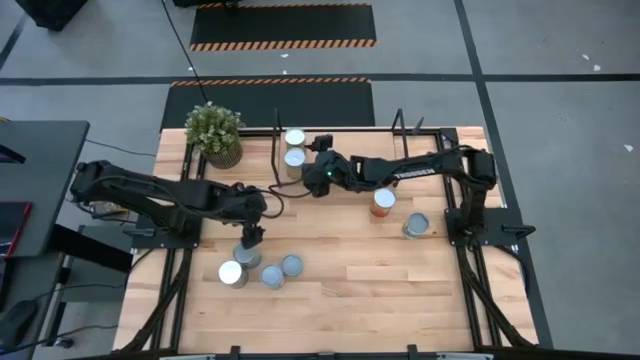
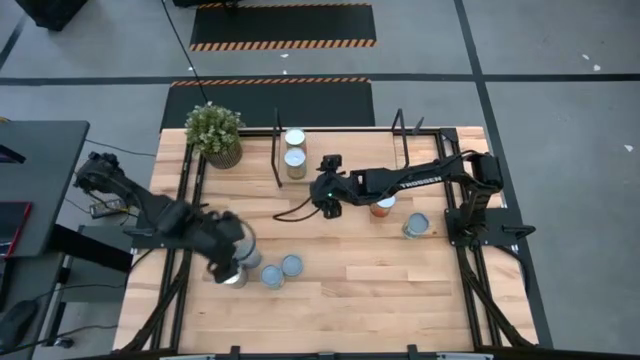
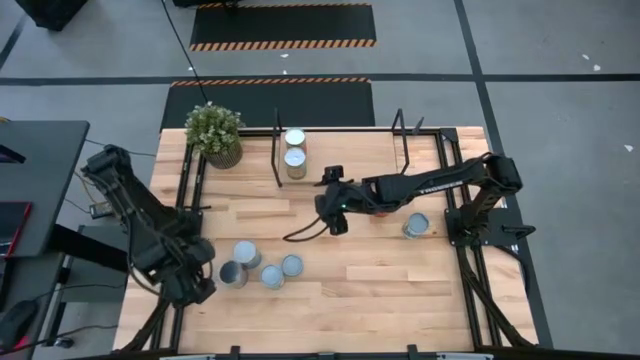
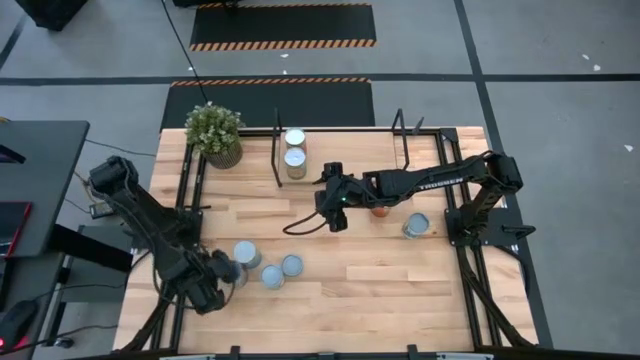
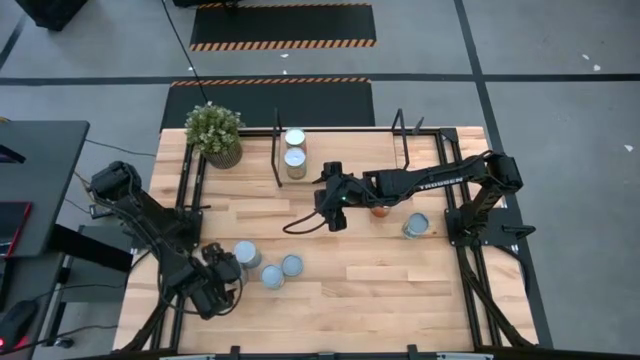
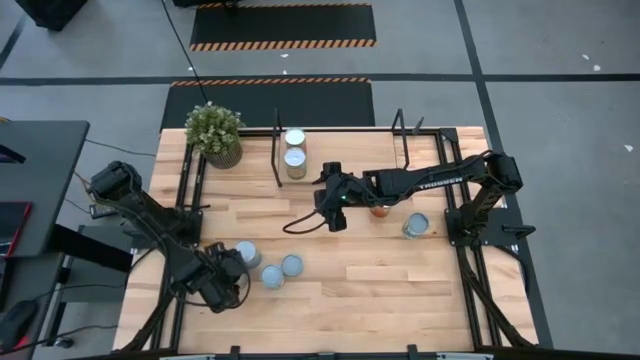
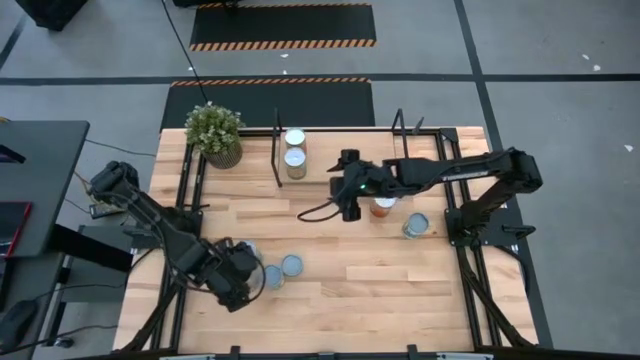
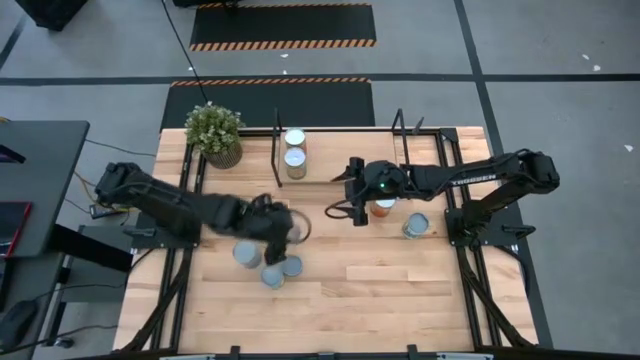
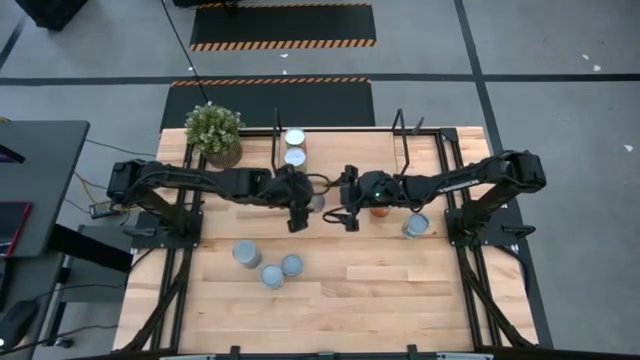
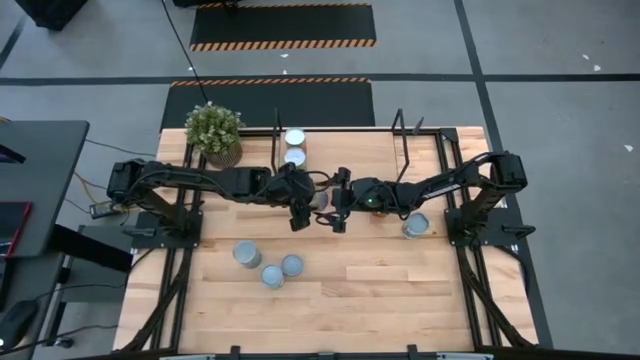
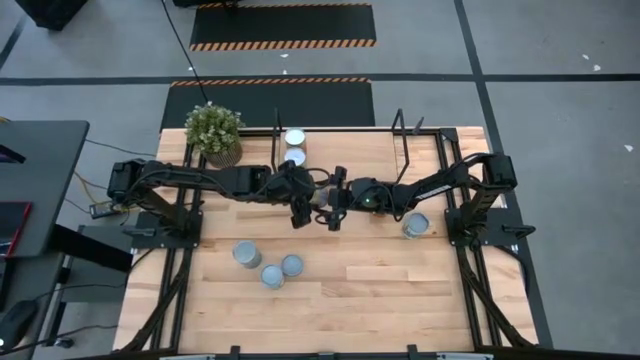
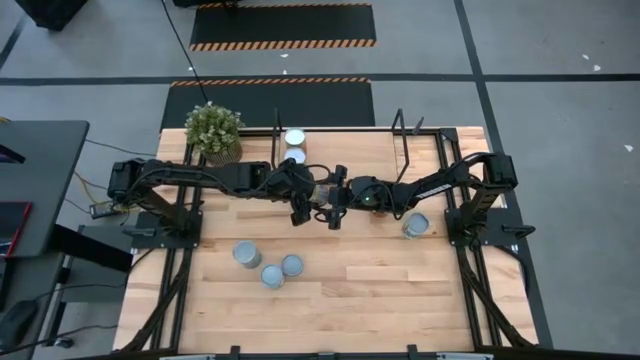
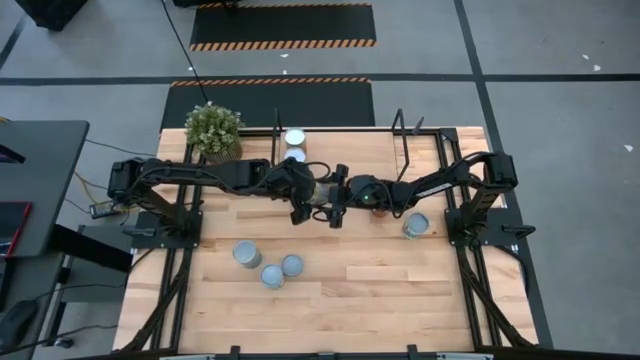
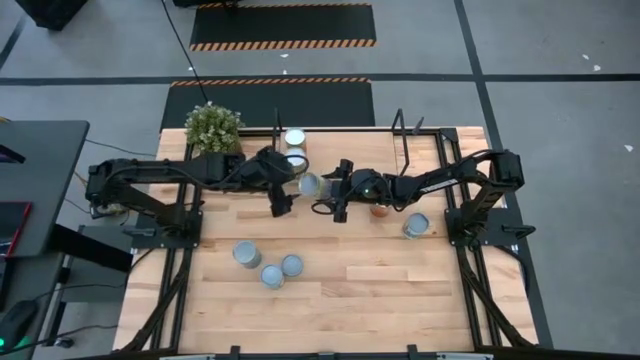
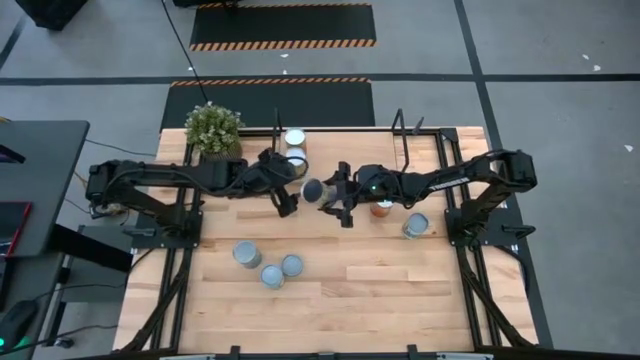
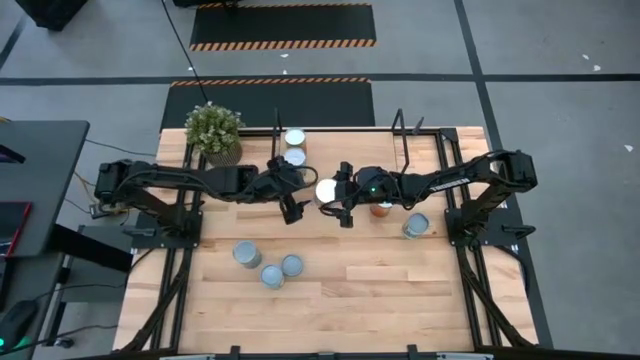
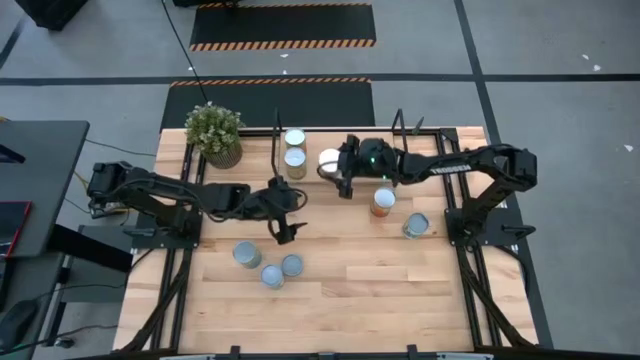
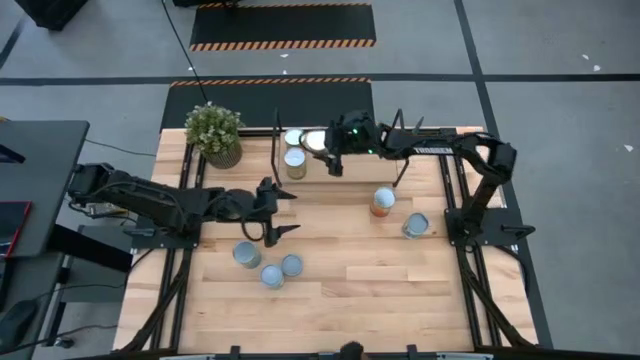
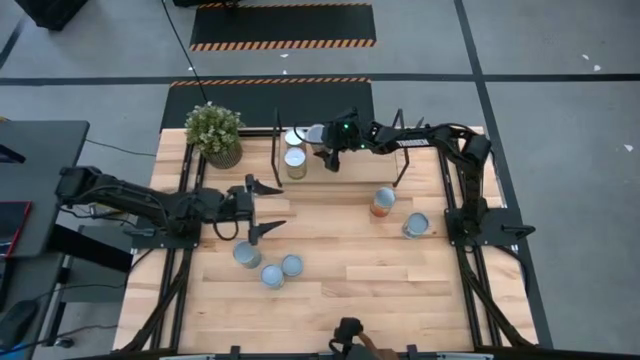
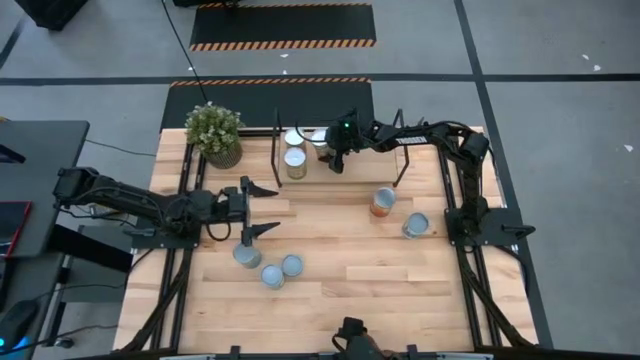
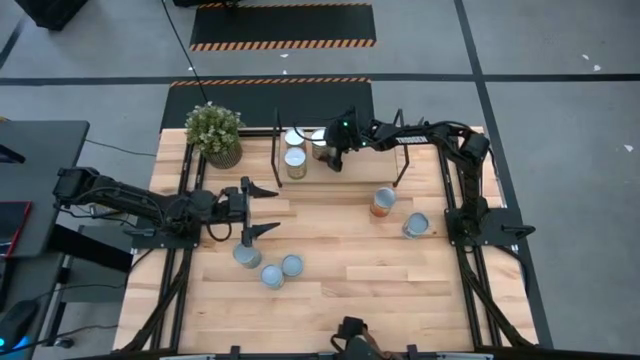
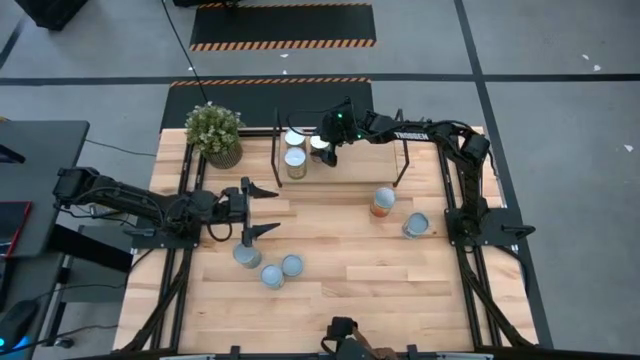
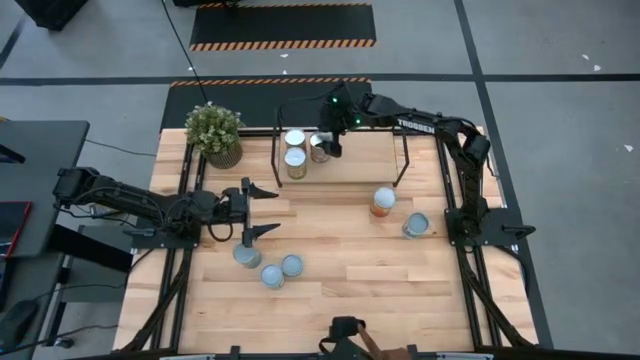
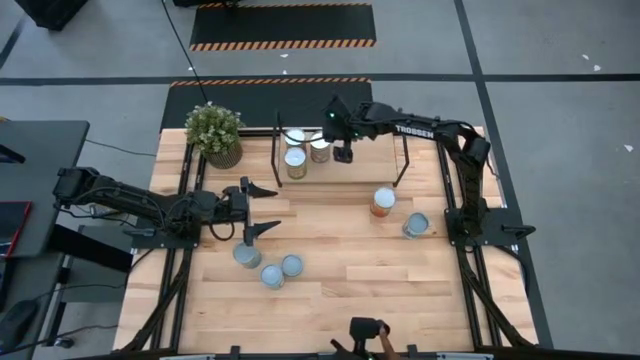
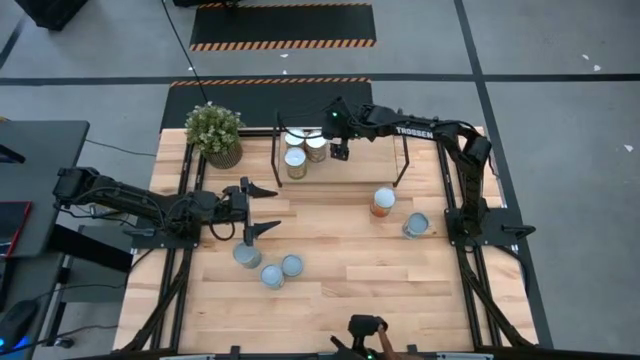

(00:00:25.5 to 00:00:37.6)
Task: Pick and place cans onto a shelf
Put the canned peaches on the shelf

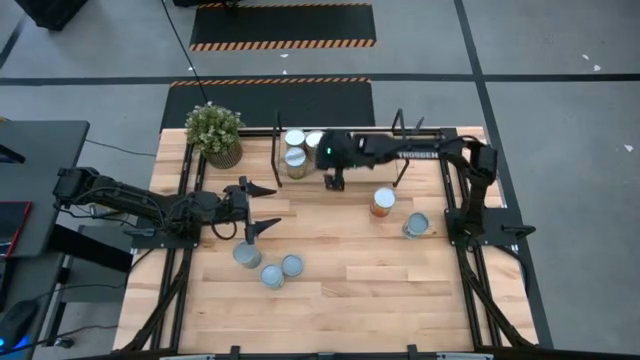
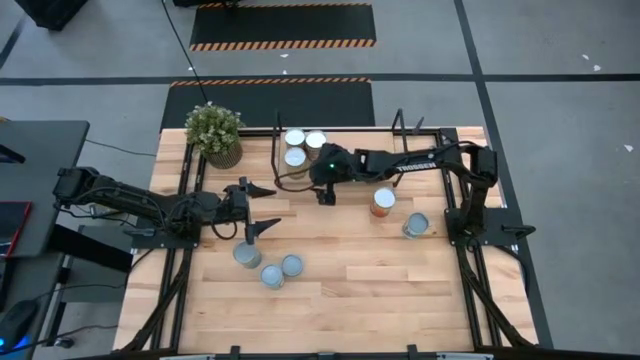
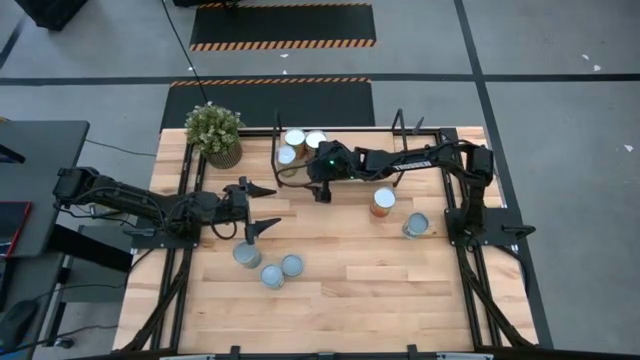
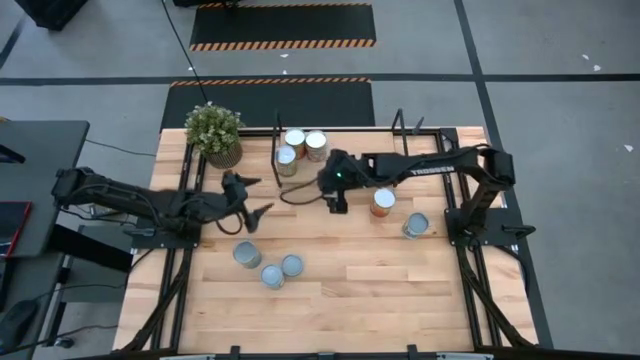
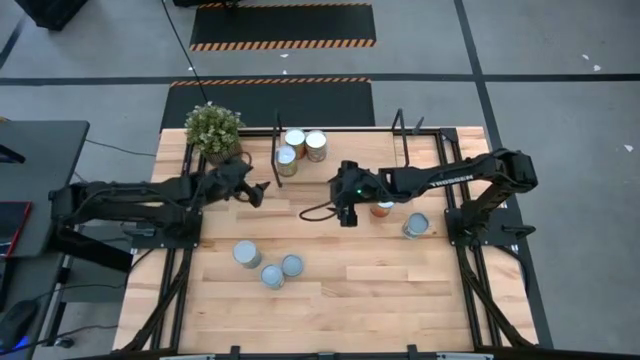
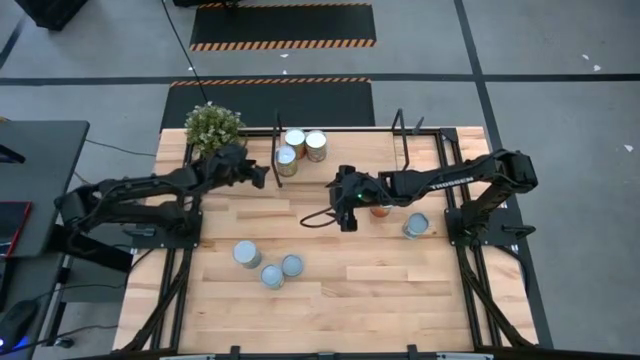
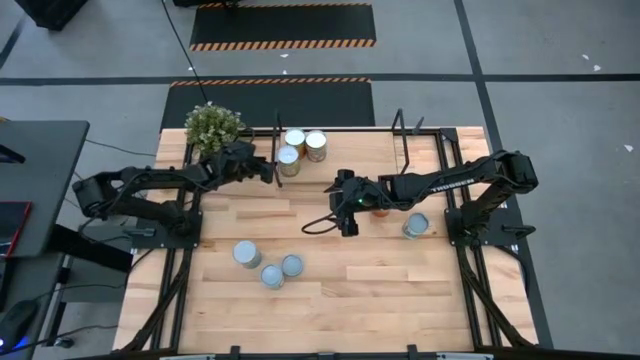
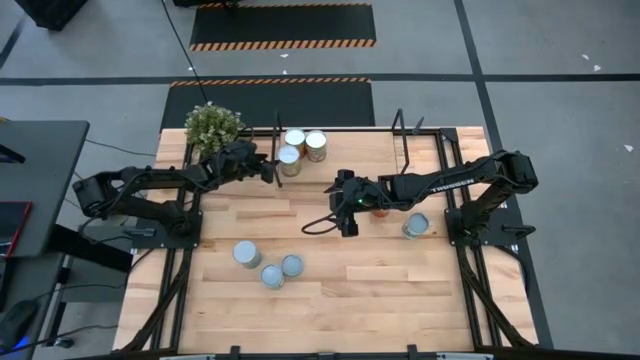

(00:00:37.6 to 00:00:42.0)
Adjust the canned oranges on the shelf

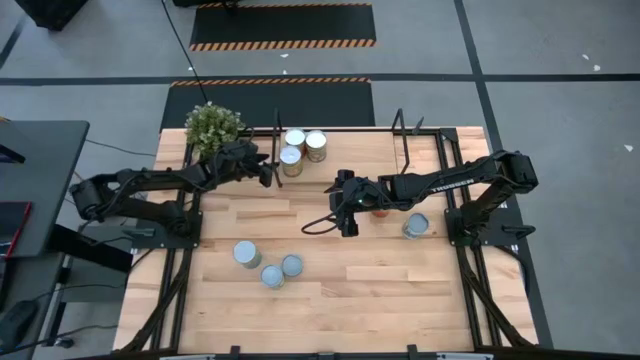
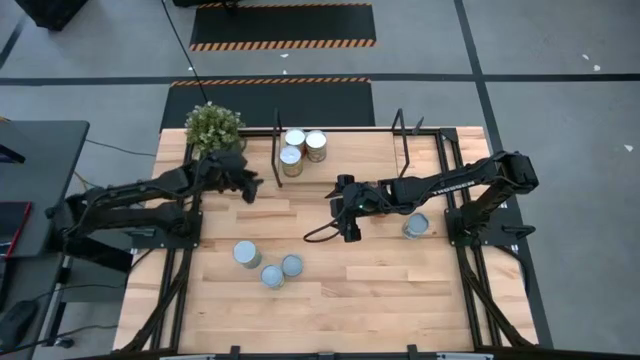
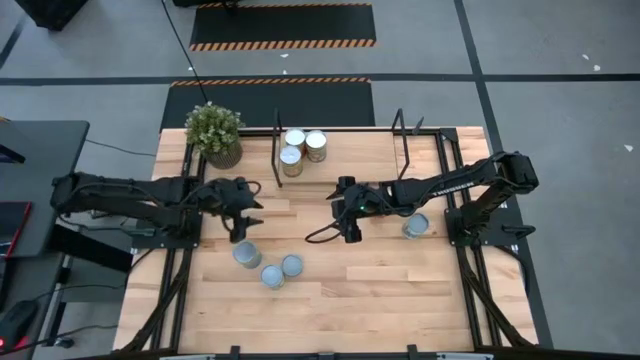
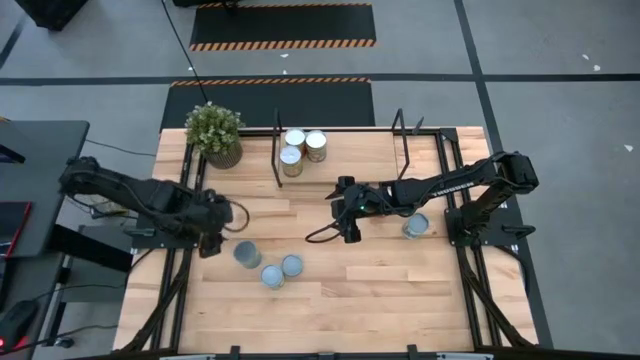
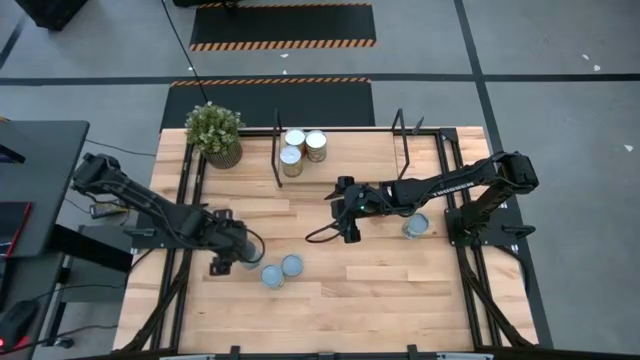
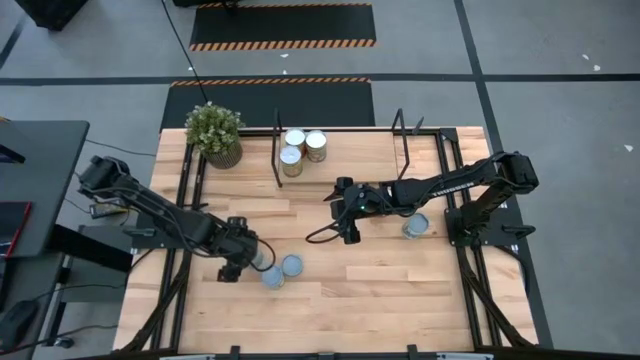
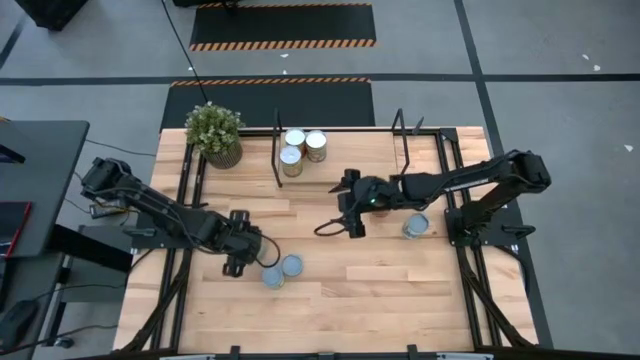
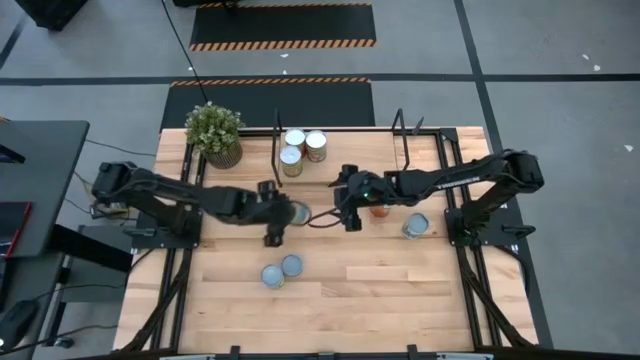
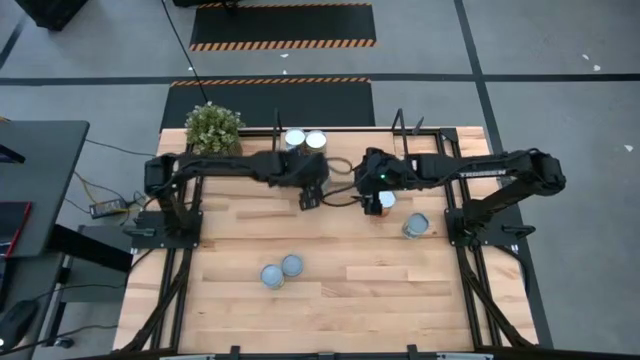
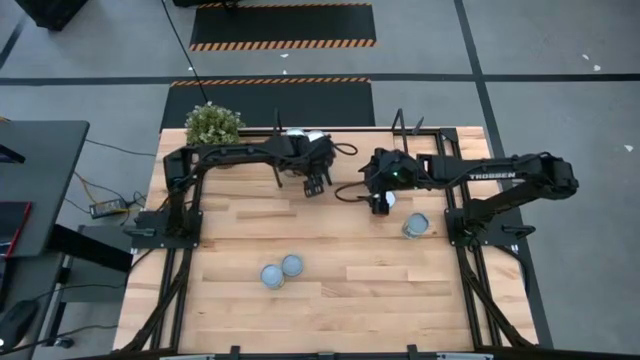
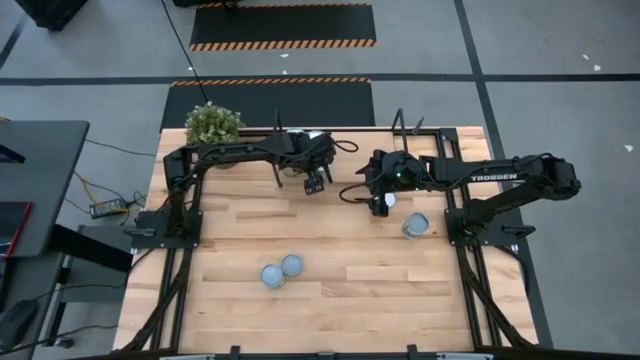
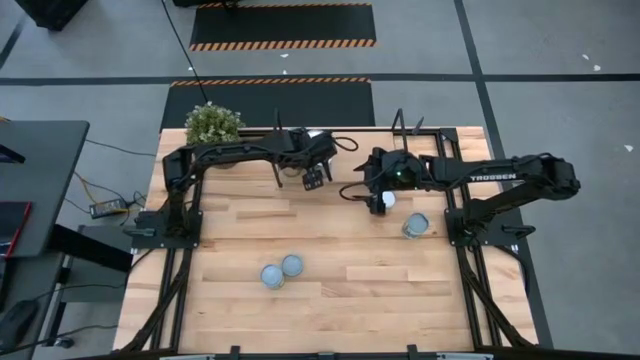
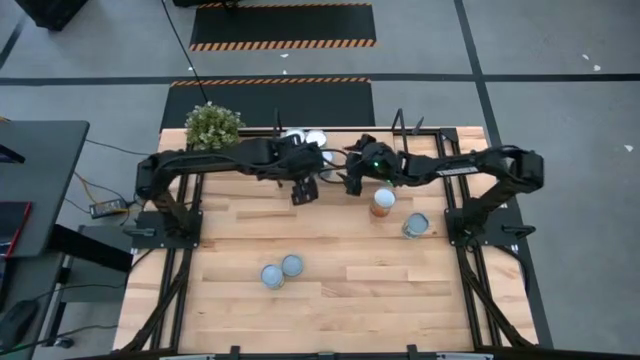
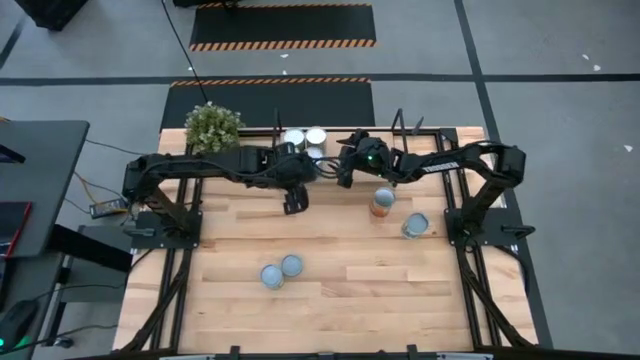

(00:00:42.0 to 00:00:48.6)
Put the canned cherries on the shelf
